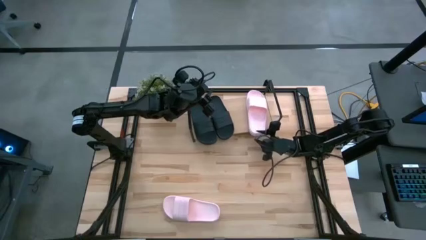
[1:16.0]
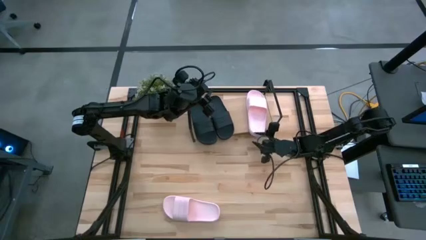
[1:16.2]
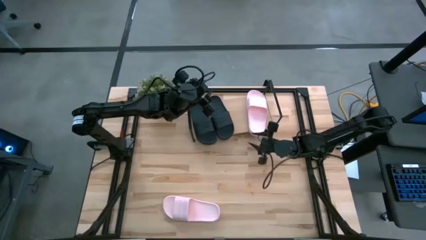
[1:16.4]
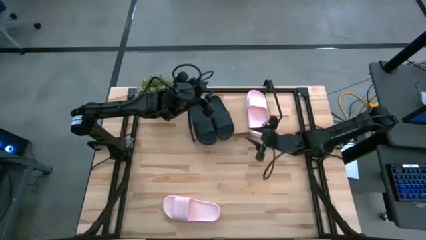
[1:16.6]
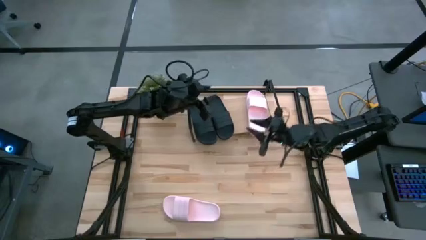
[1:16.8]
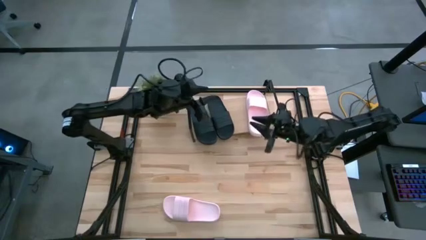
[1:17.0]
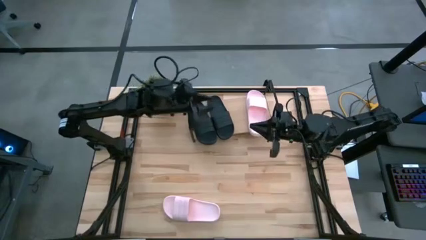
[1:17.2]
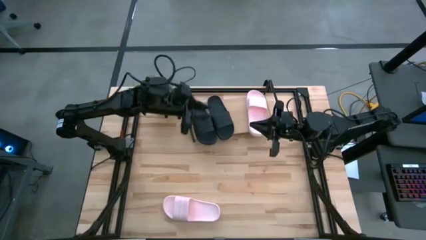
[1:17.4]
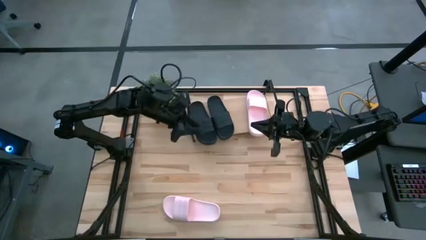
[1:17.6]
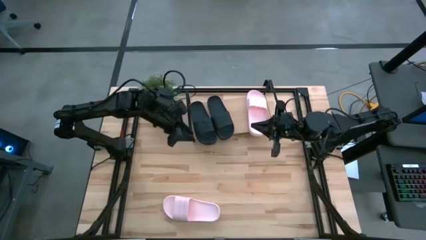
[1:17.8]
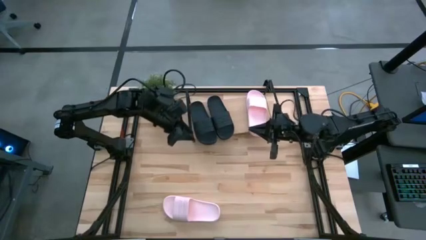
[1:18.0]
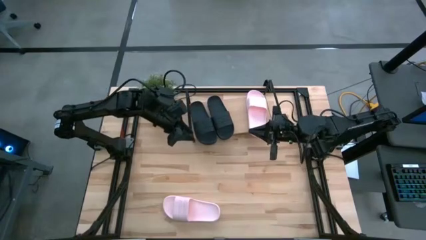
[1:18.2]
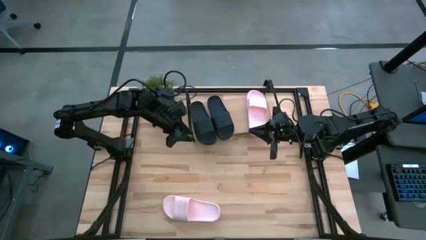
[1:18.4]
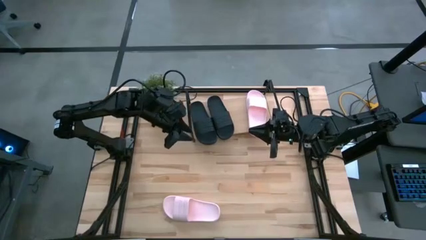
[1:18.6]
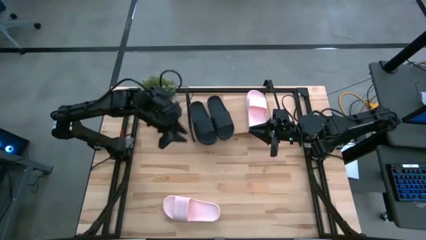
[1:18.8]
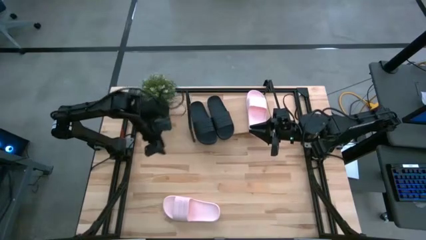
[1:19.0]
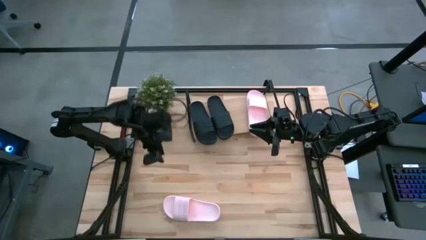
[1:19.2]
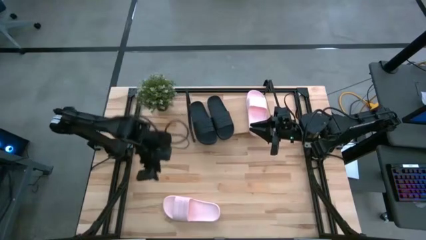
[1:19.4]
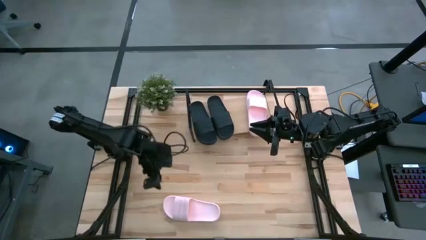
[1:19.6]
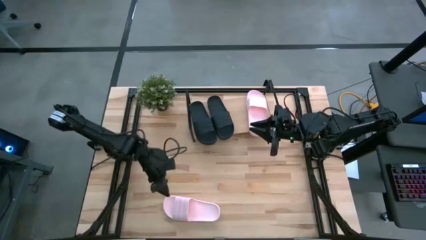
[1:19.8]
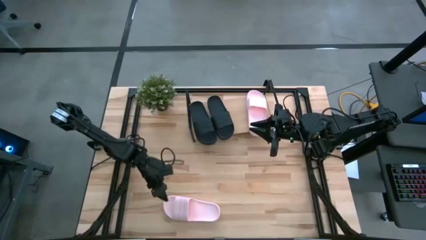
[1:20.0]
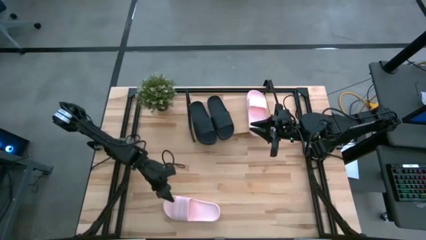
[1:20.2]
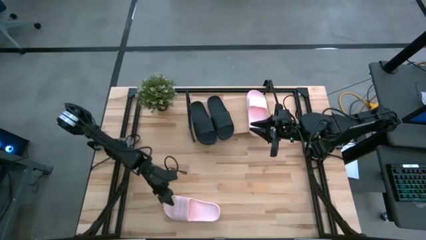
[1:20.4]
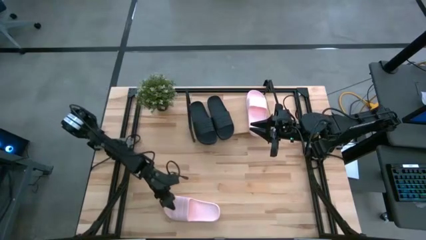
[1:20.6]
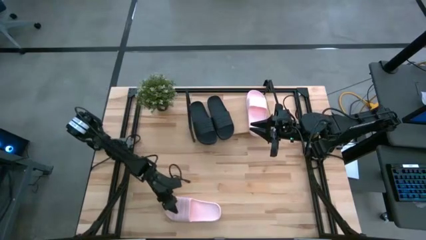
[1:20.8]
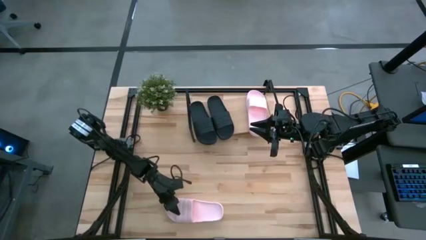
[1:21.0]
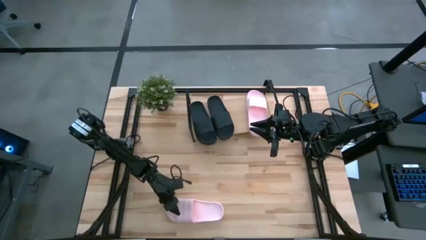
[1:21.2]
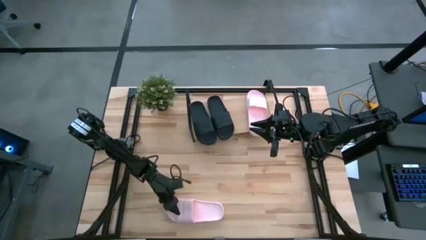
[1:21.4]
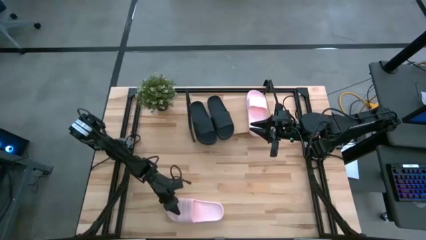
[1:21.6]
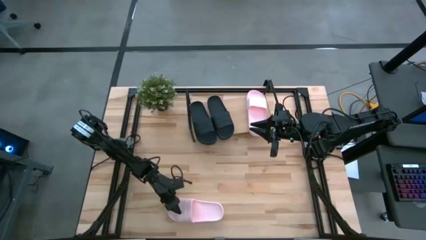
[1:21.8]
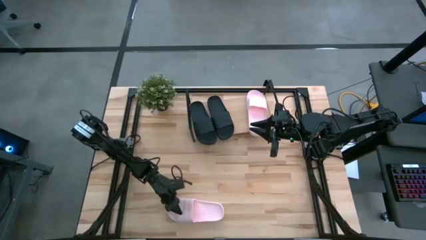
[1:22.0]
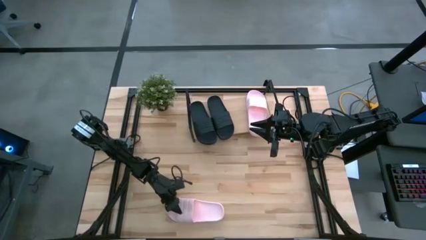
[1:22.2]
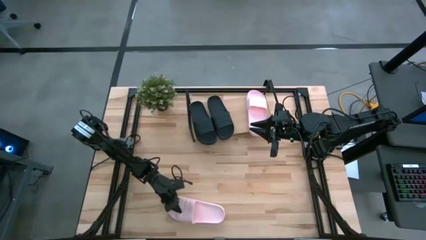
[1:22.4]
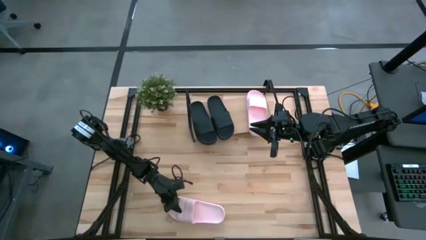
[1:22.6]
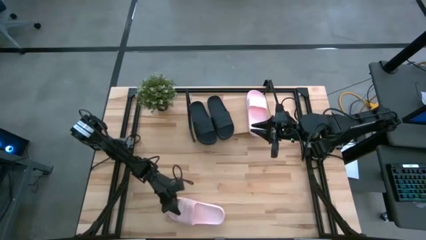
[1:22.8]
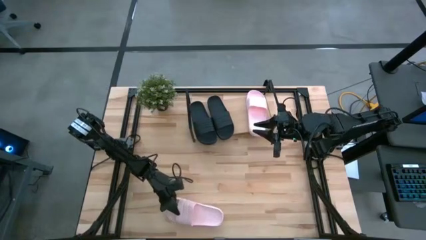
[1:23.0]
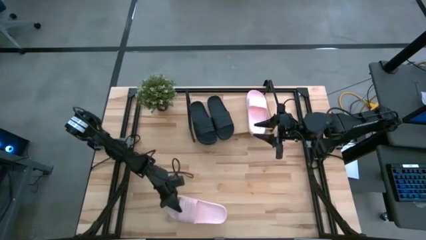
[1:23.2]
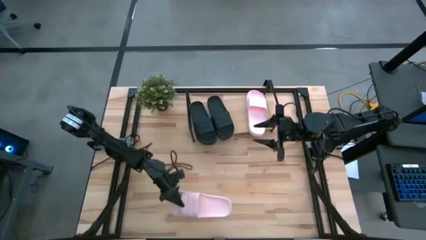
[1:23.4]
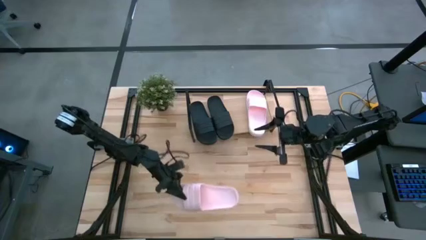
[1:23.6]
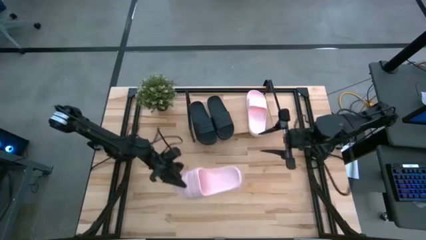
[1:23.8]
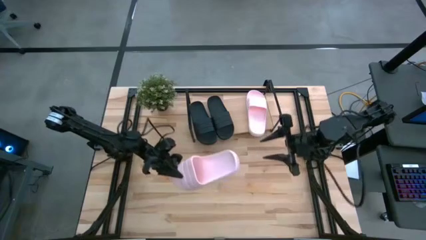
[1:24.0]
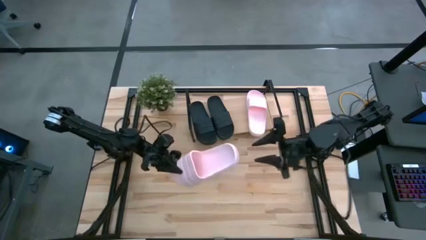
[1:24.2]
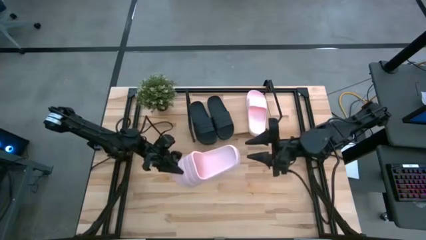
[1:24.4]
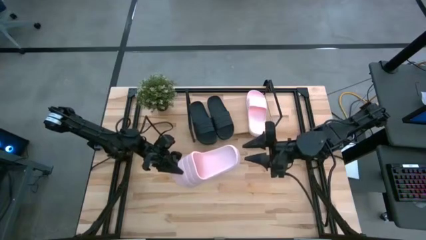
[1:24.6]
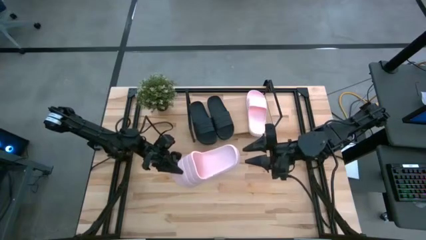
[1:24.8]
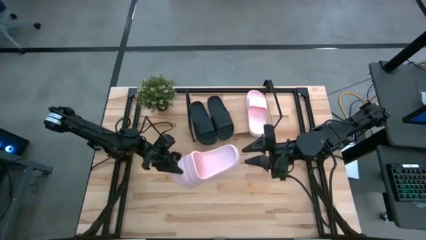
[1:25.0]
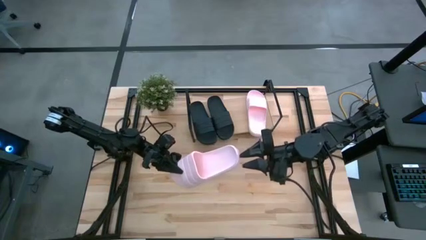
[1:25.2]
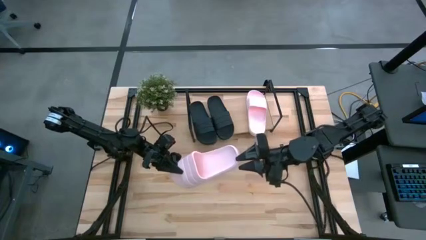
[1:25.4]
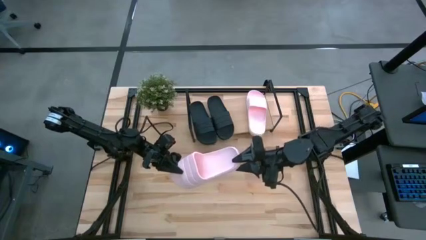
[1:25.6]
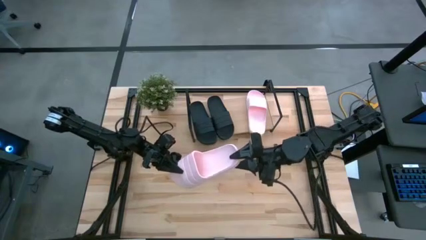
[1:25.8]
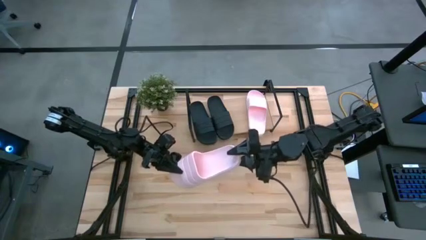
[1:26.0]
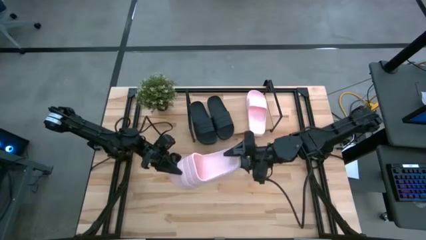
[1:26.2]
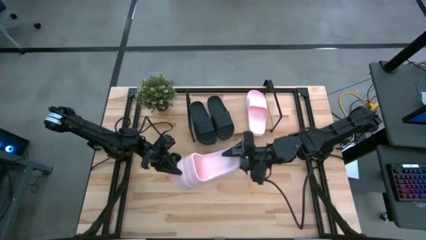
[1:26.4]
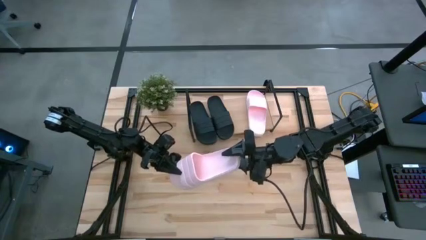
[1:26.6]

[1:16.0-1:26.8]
Task: Pick and place slides into the shelf
Put the pink slipper on the shelf

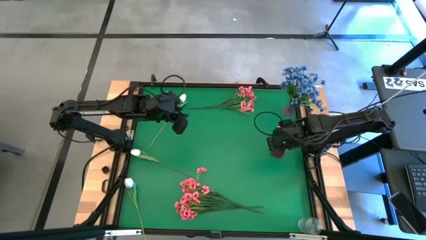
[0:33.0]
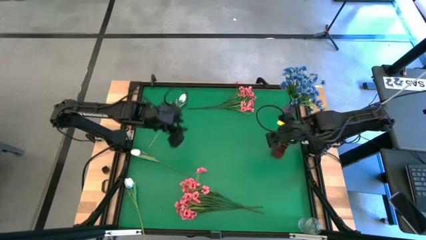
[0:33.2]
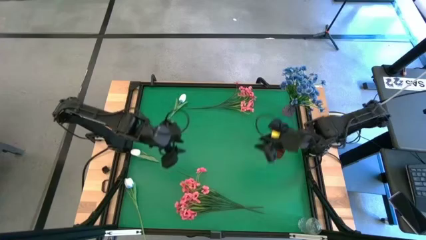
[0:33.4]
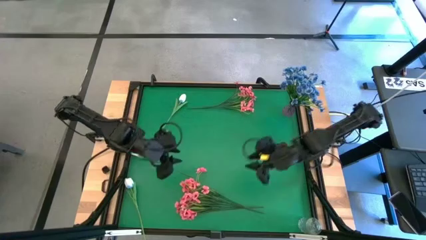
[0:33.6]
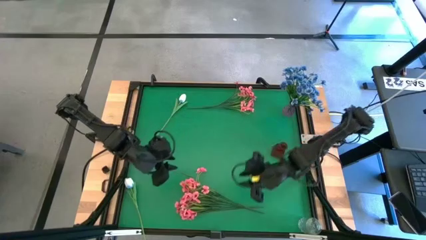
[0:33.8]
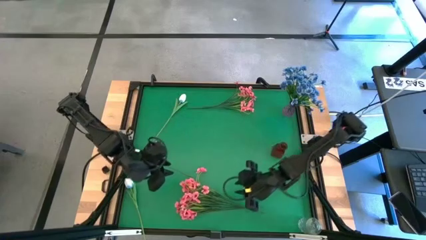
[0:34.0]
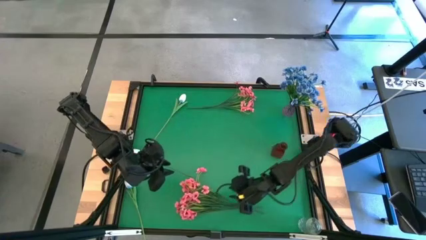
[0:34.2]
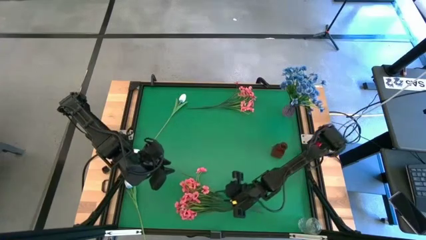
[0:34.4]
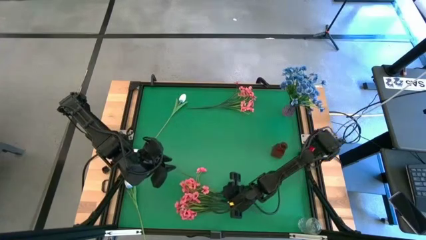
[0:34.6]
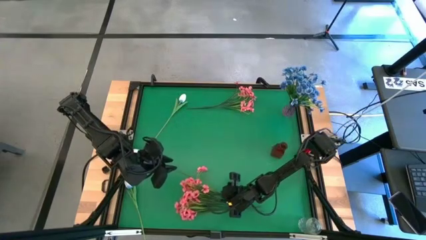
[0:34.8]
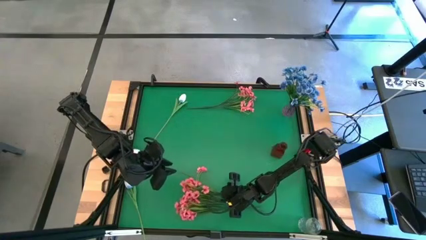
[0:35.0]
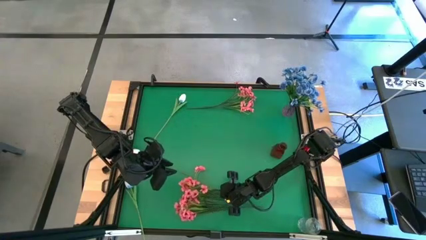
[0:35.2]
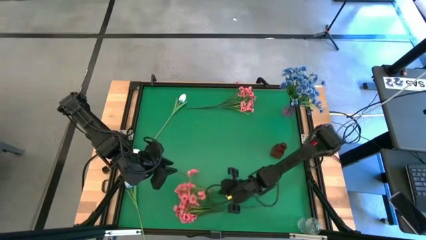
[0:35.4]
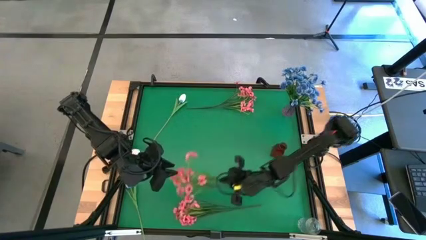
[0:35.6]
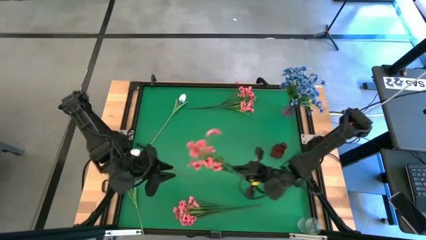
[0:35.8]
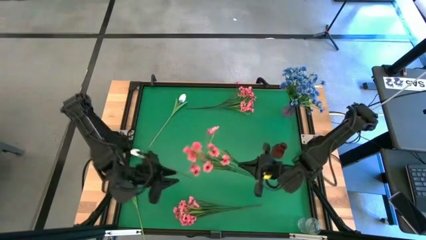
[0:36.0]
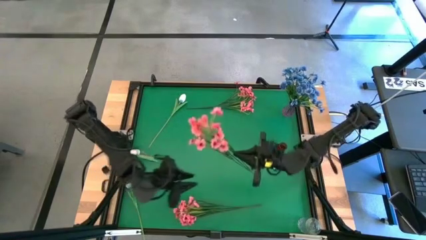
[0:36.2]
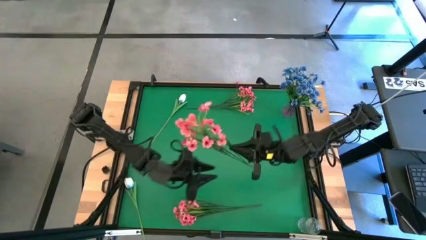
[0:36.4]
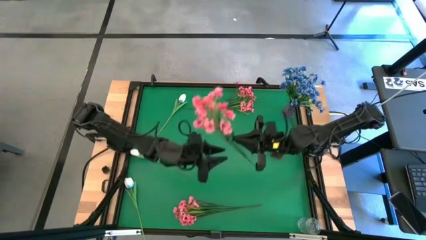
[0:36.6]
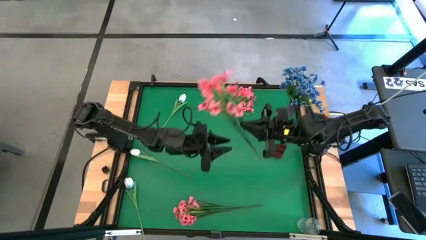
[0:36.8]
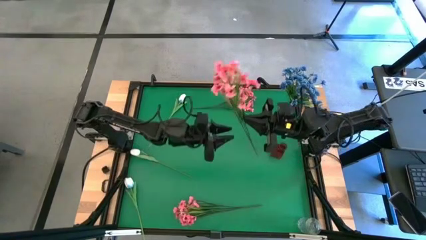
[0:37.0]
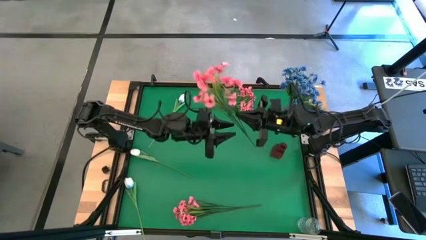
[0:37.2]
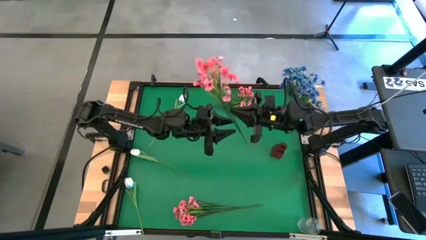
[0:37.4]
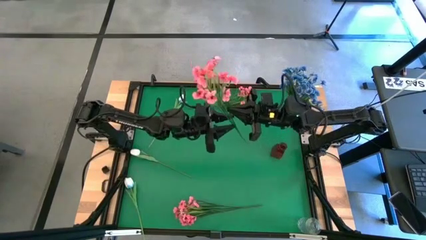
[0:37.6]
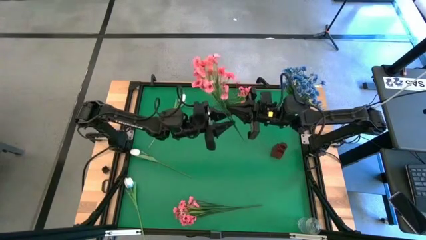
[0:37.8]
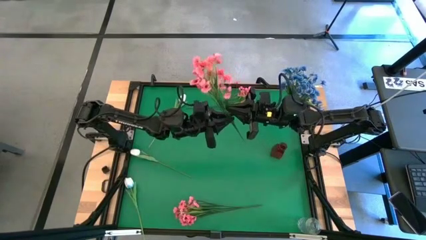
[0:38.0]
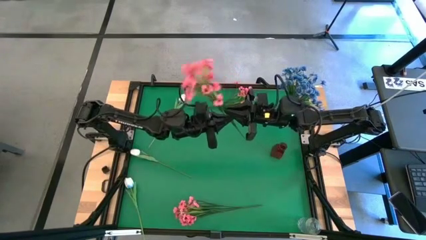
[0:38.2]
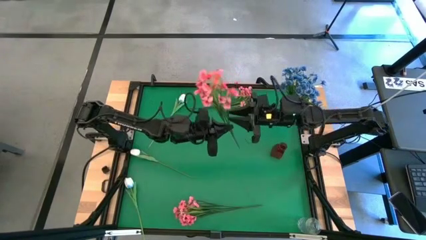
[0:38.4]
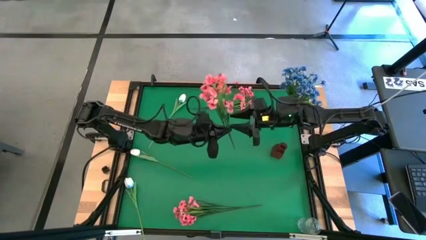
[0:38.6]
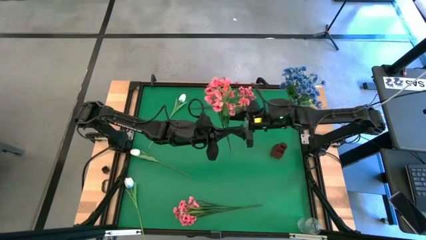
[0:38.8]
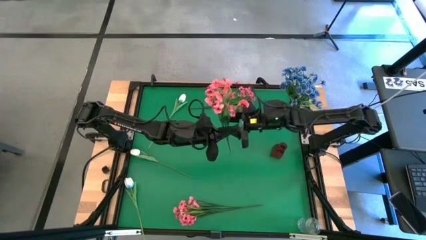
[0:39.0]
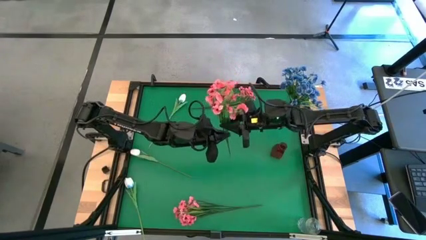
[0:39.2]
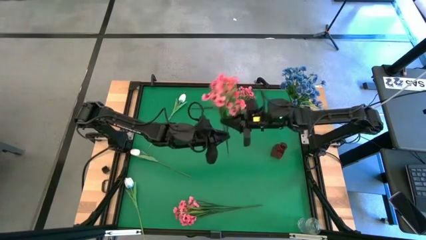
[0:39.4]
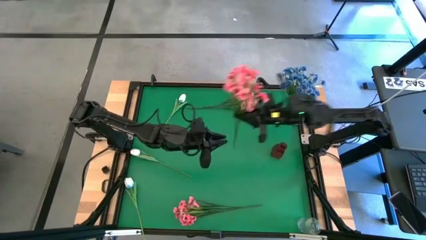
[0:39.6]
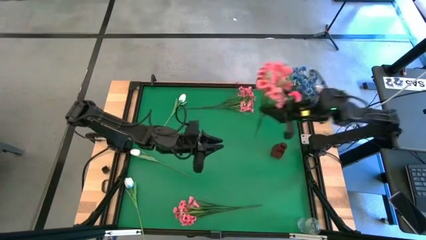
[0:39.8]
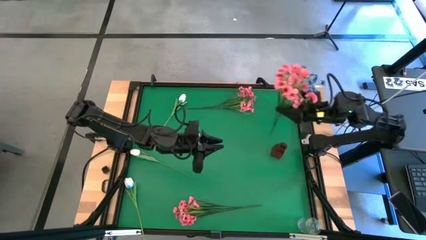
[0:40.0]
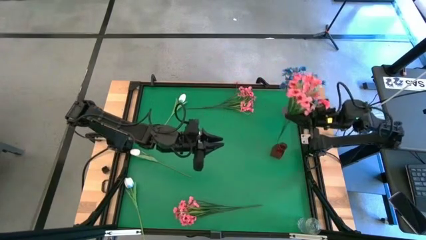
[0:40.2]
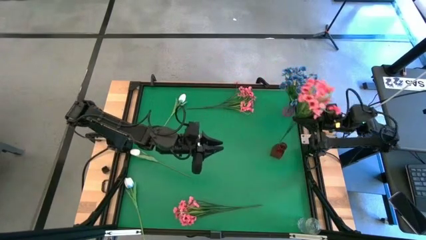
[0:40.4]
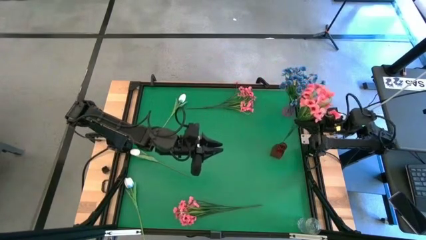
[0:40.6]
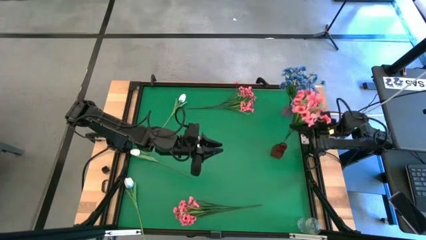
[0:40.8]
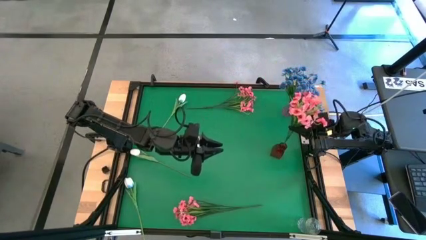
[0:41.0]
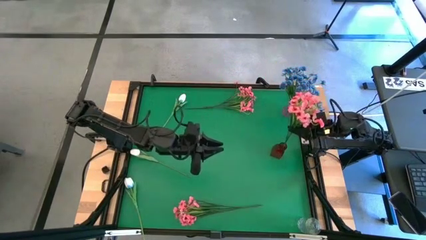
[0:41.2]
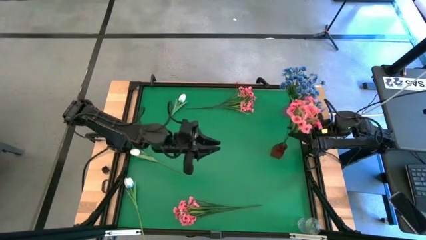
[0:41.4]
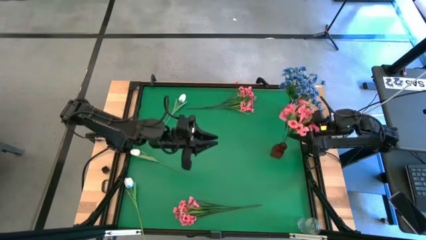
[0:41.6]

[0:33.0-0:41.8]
Task: Sort flowers into vase by color
Put the center pink flowers into the red vase
